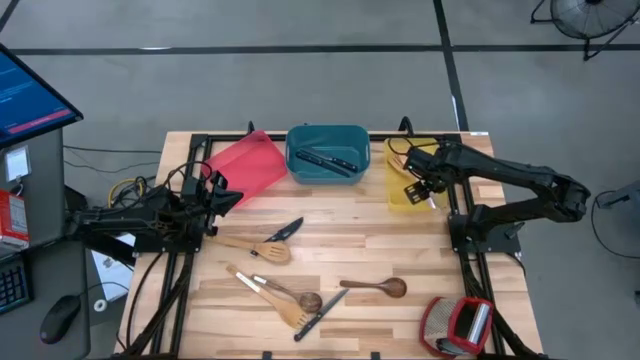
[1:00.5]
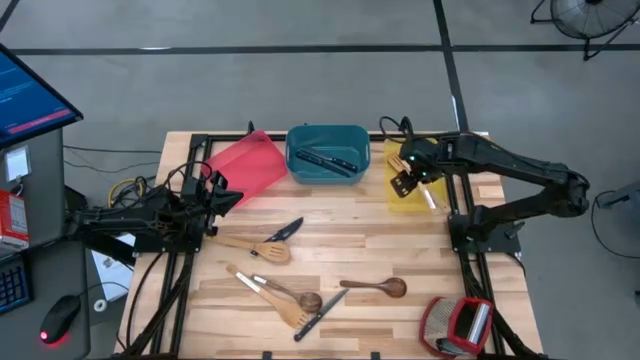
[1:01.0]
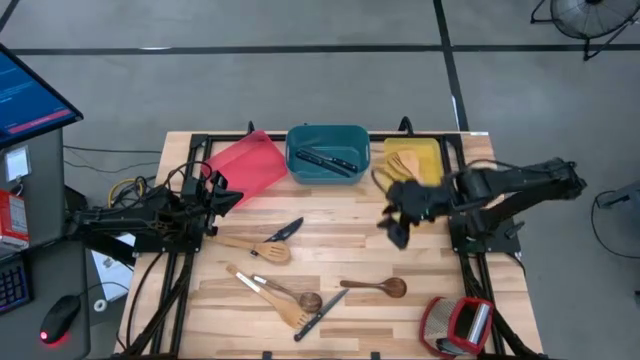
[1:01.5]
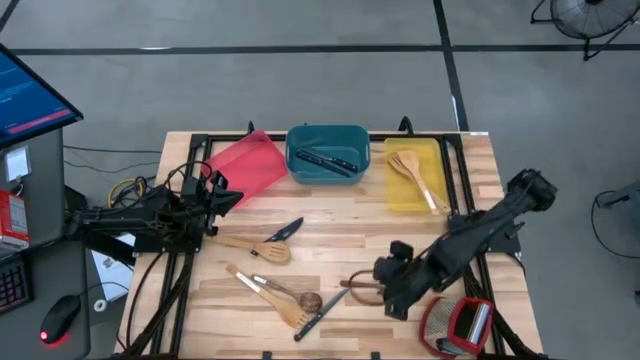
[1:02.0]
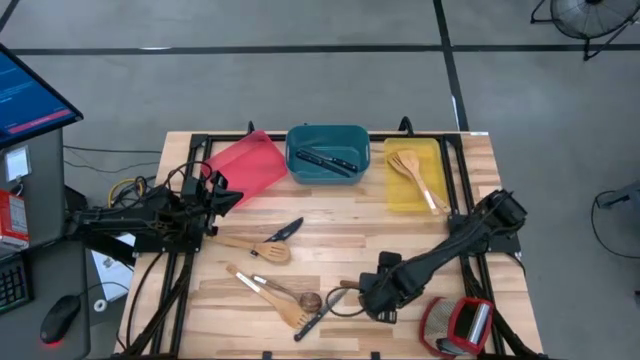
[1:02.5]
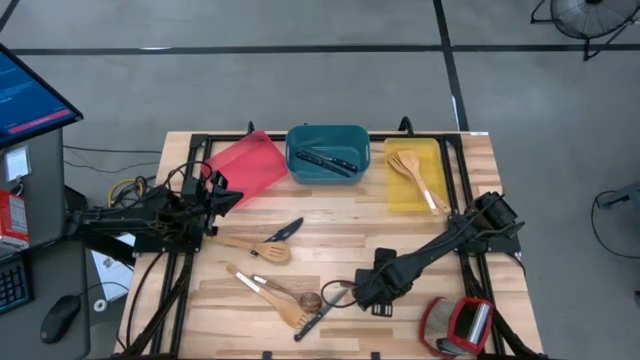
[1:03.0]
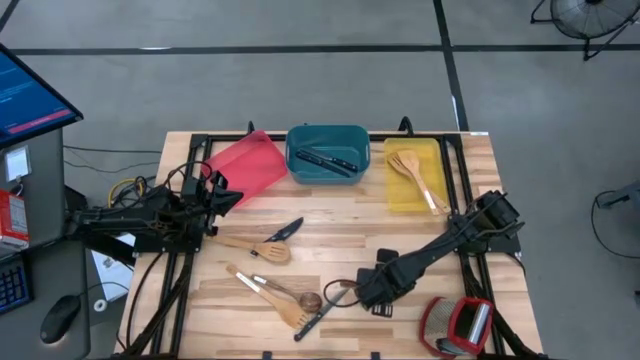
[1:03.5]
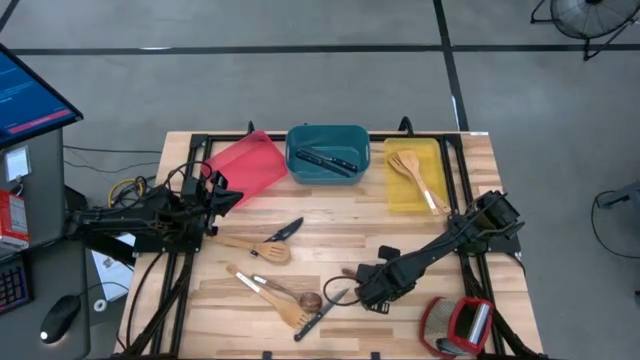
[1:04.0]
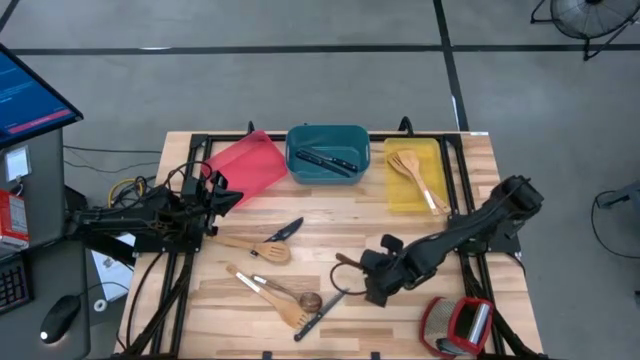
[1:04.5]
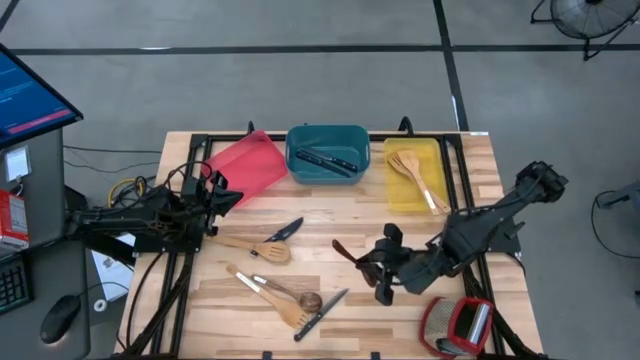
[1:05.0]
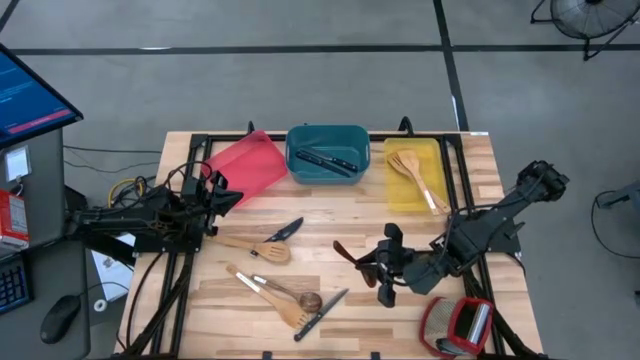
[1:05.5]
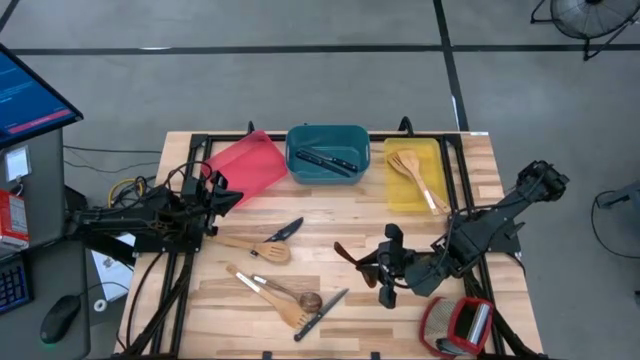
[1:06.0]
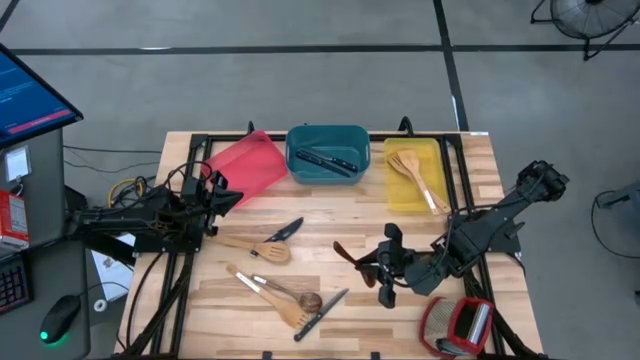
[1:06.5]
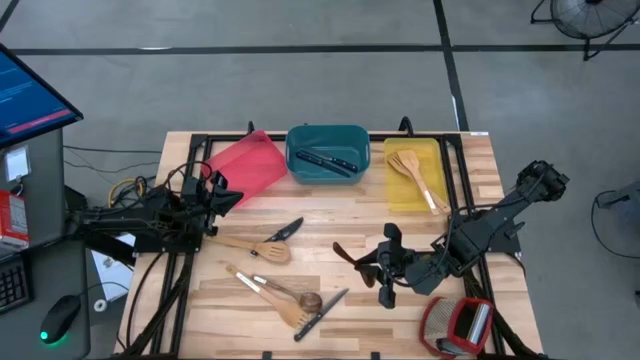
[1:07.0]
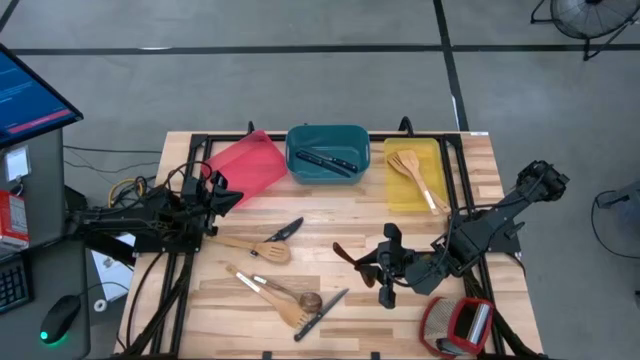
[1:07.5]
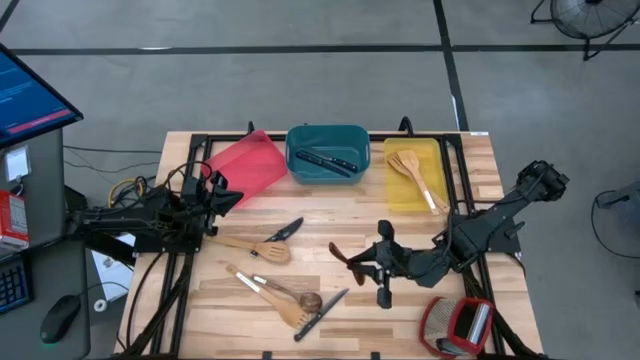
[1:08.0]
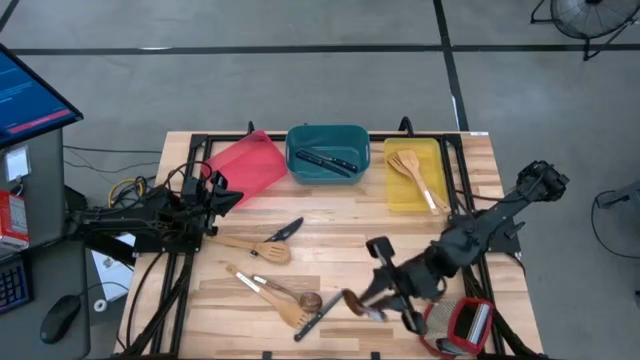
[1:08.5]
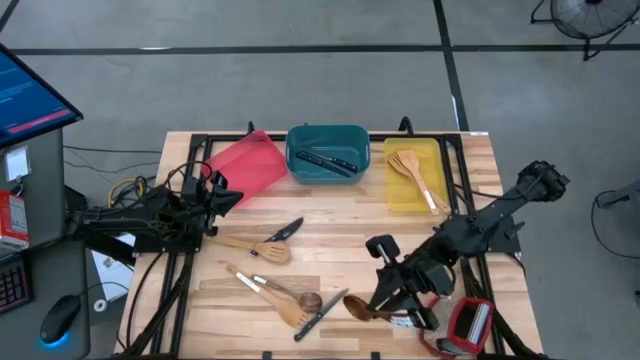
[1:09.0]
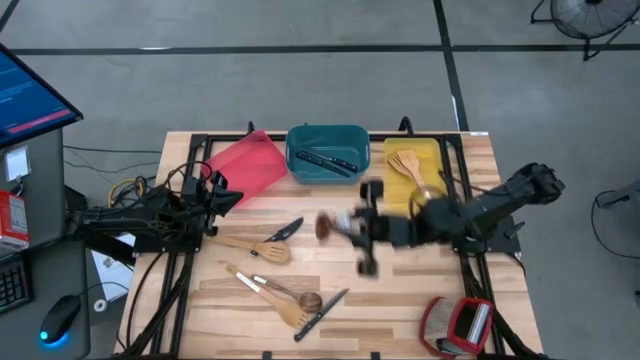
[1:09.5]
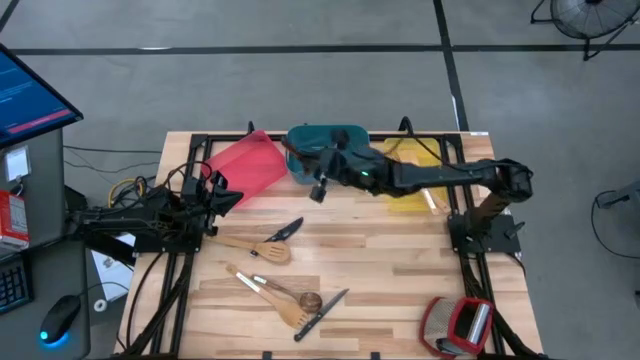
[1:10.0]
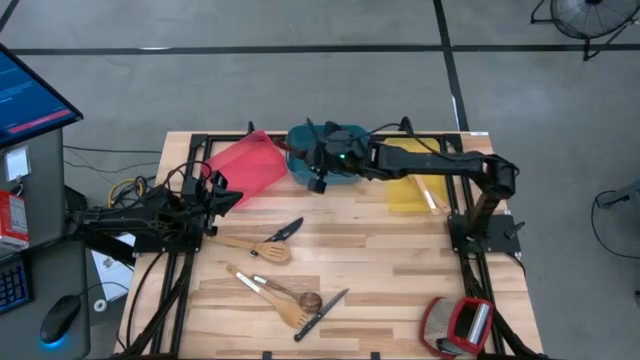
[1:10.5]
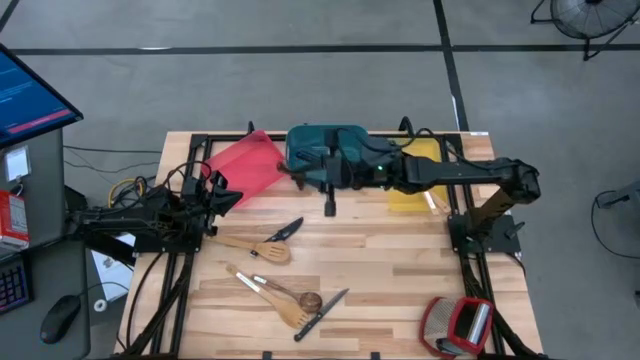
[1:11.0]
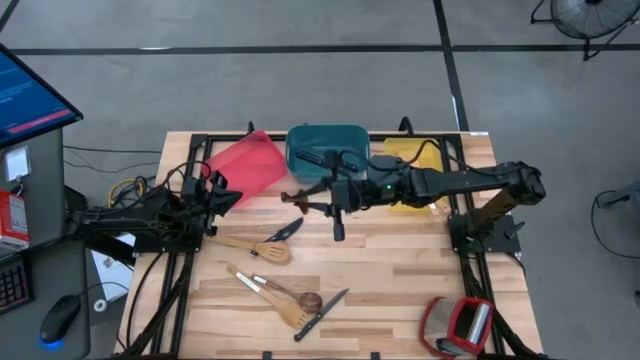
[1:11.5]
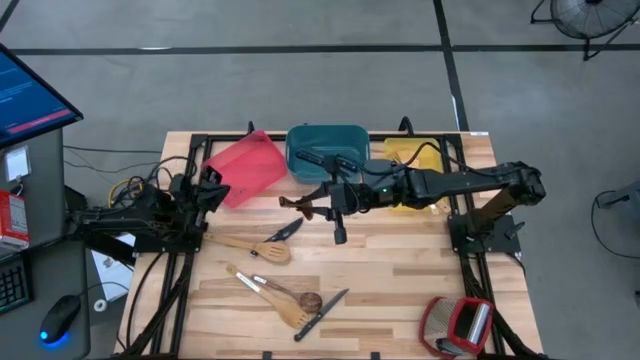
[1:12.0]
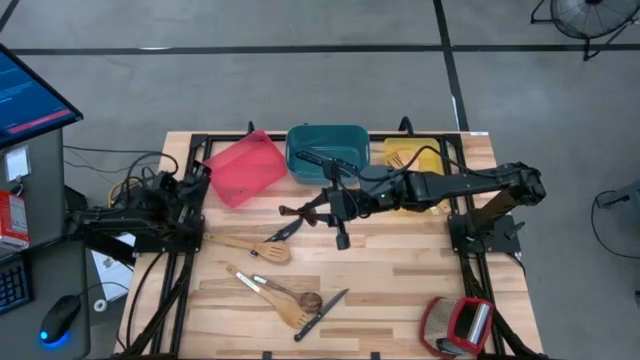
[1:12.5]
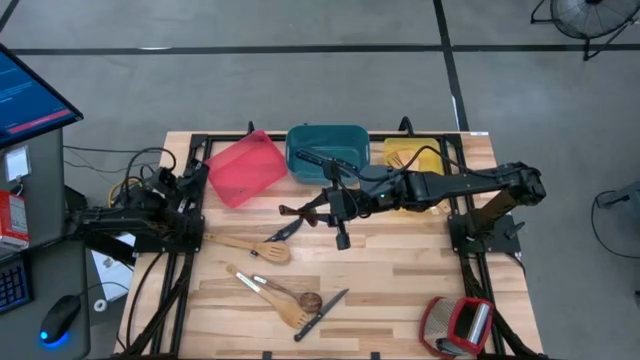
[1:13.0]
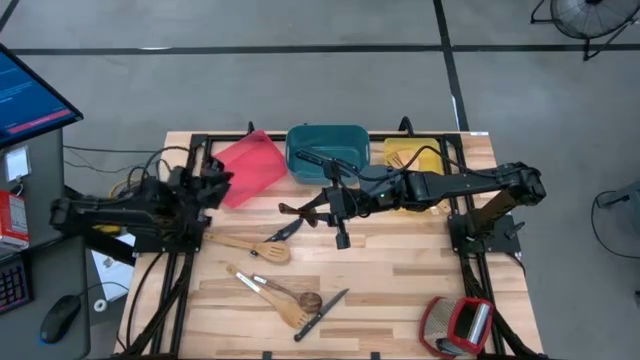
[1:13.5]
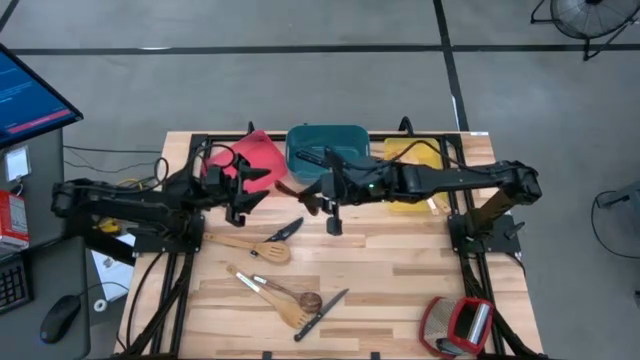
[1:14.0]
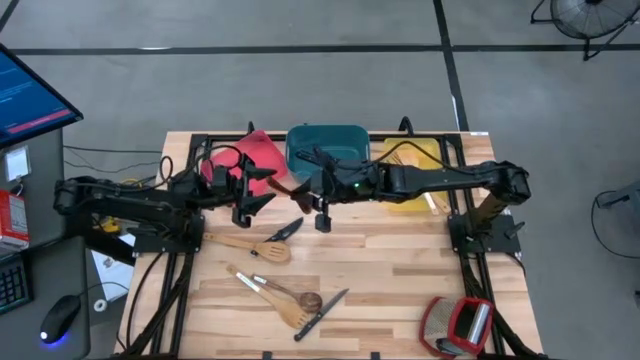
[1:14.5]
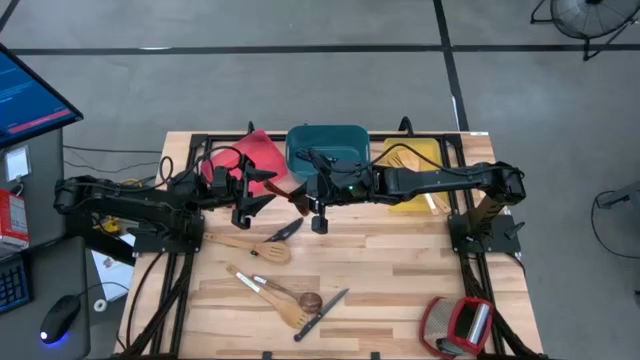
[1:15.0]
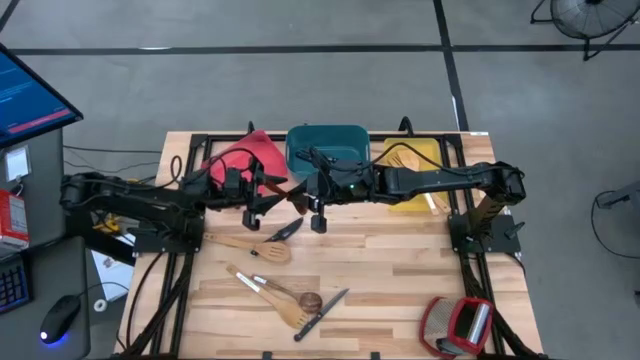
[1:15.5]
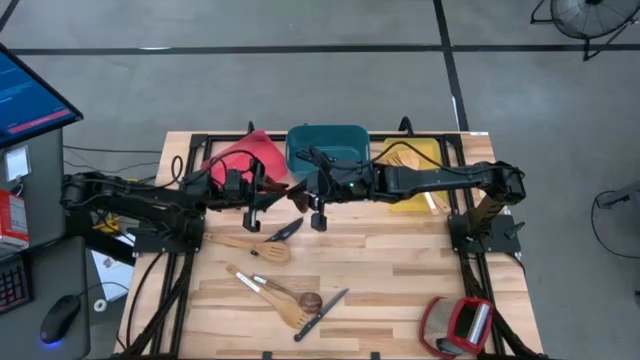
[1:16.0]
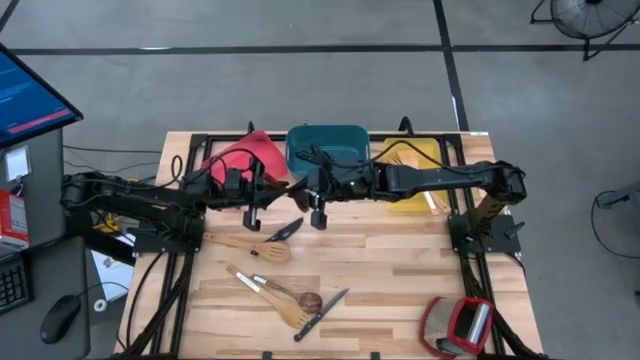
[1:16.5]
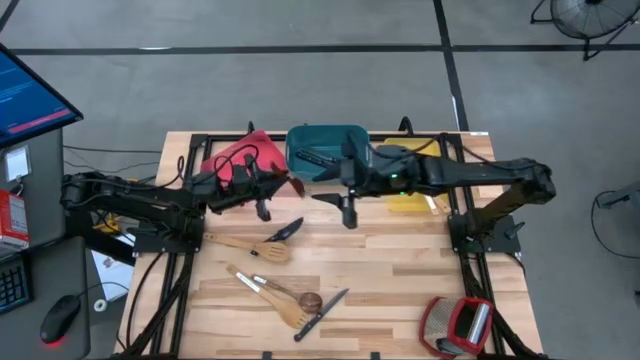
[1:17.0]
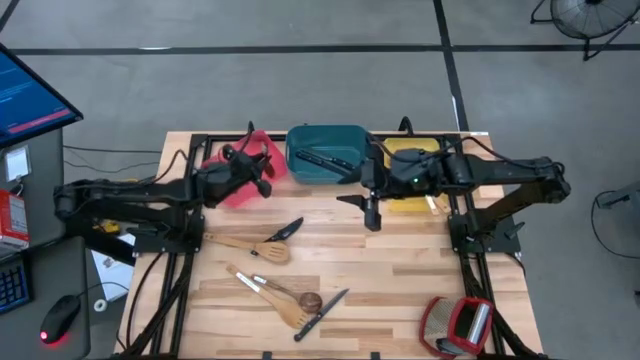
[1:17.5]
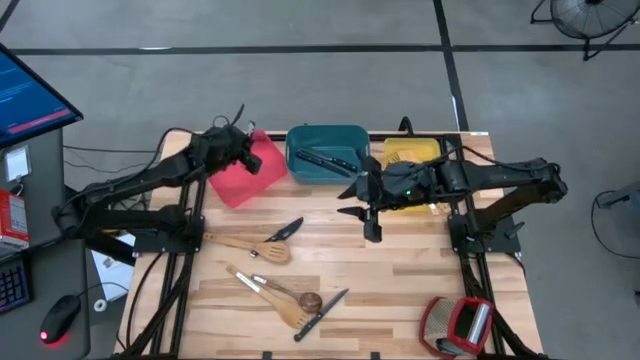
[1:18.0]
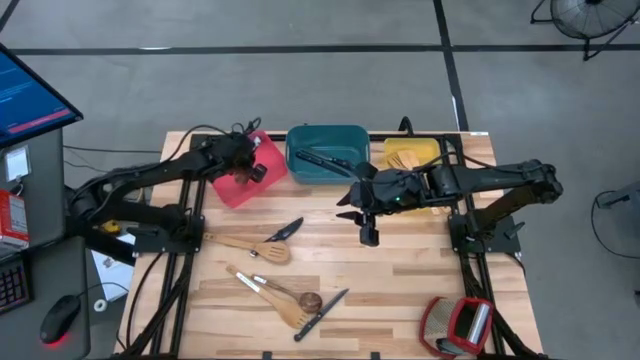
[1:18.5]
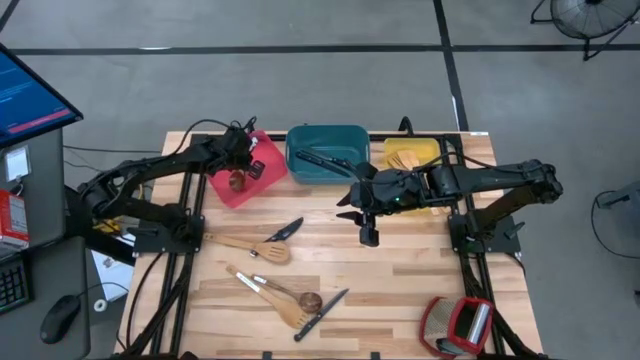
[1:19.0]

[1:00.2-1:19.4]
Task: Pick & Place Kitchen Items
Put the wooden serving spoon into the red bin

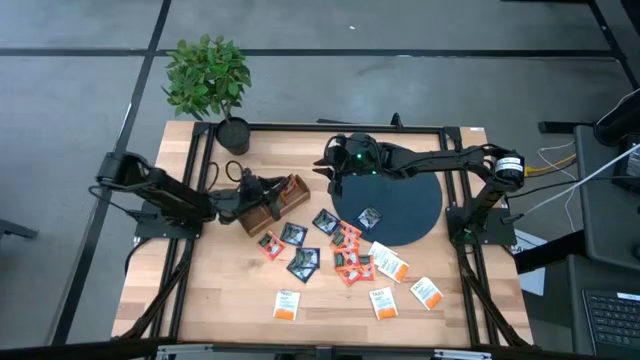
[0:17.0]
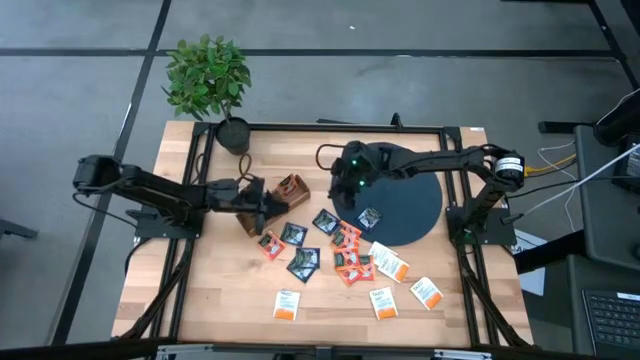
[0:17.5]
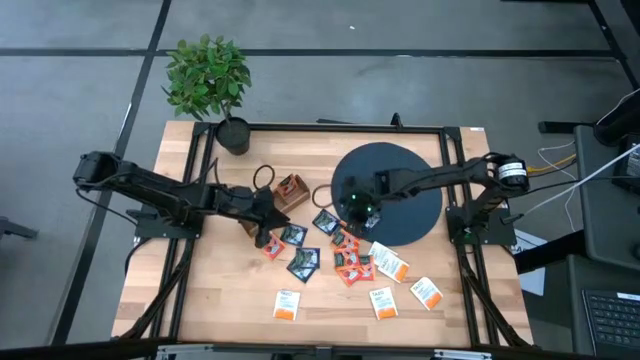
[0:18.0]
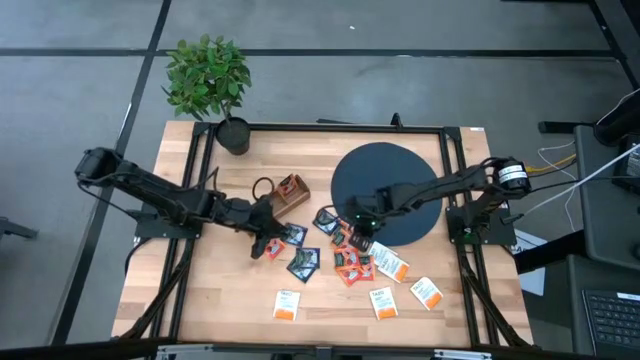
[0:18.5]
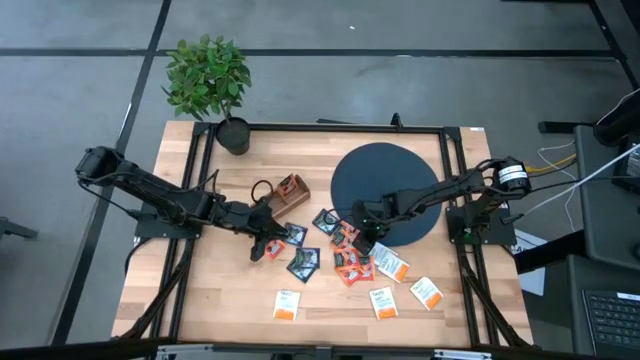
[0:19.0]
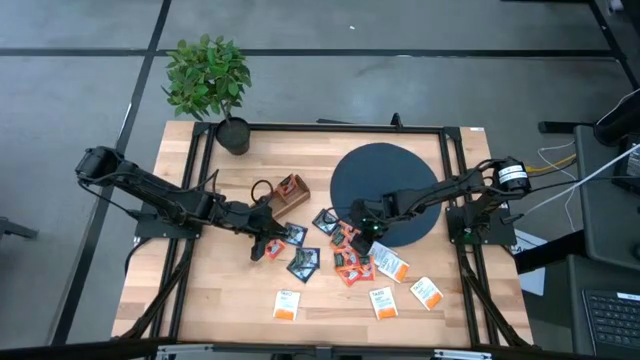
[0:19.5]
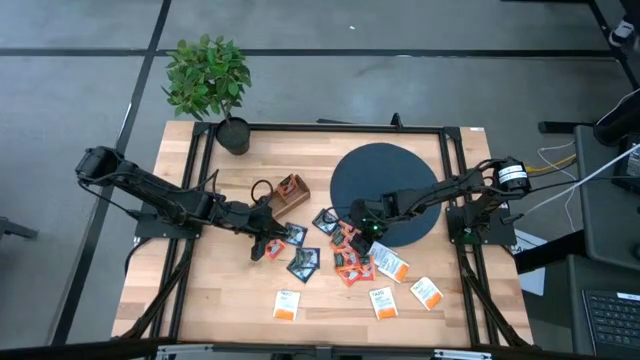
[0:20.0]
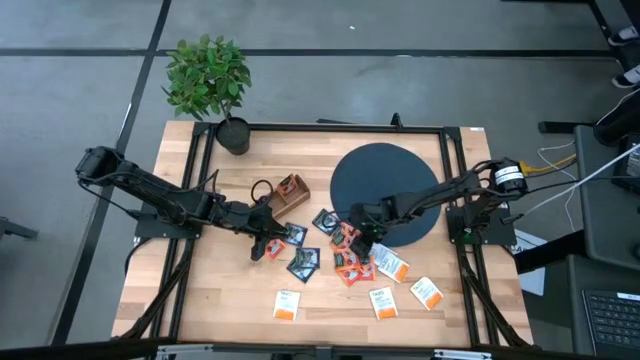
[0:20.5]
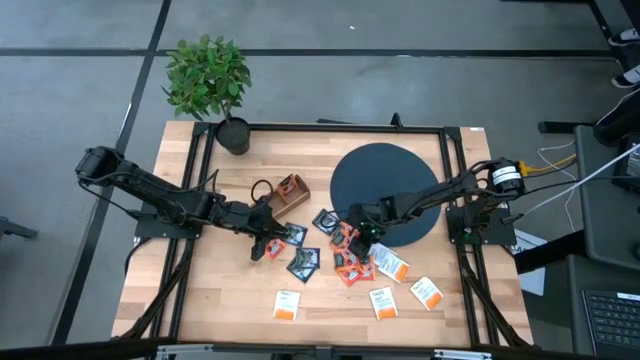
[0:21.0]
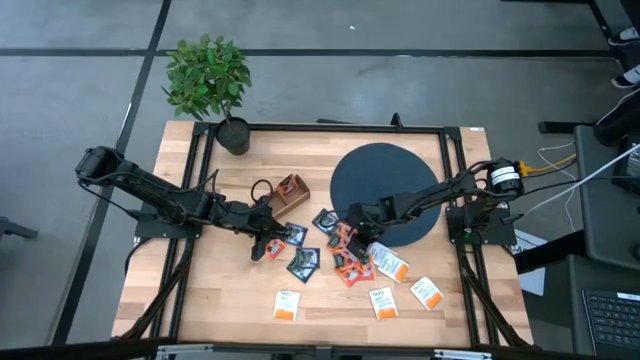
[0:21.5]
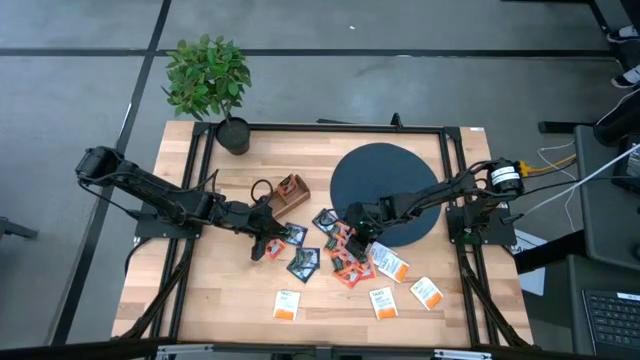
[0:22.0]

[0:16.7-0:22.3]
Task: Pick & Place Tea
Put the orange tea bag into the right section of the wooden organizer
